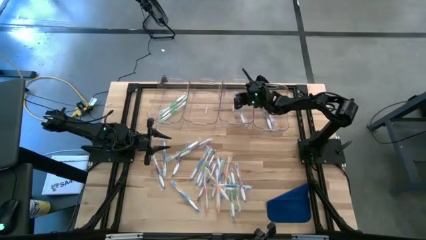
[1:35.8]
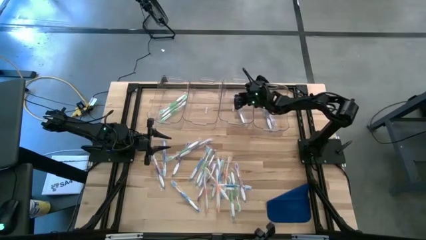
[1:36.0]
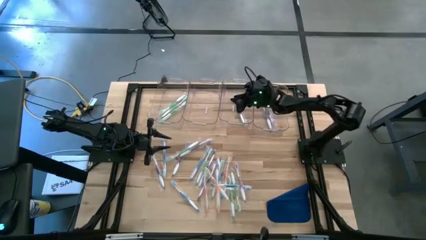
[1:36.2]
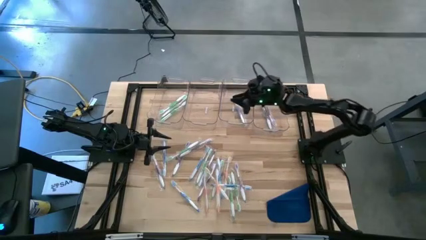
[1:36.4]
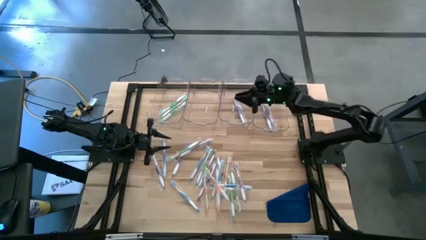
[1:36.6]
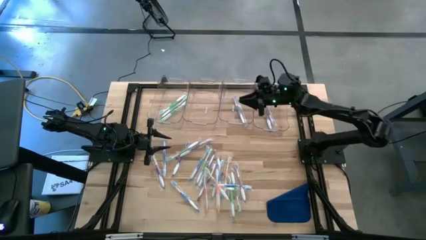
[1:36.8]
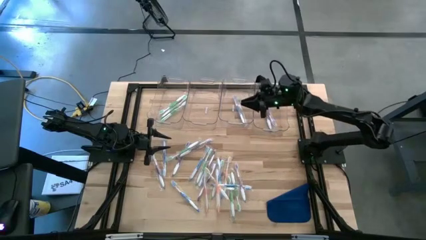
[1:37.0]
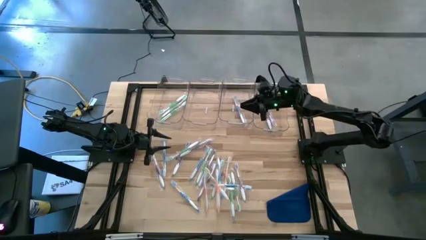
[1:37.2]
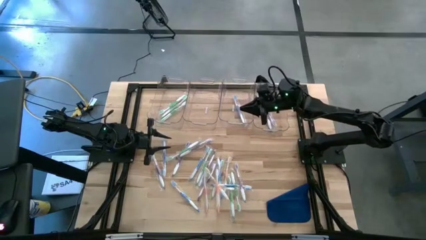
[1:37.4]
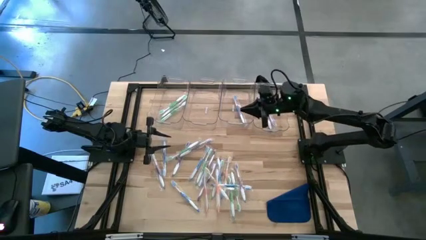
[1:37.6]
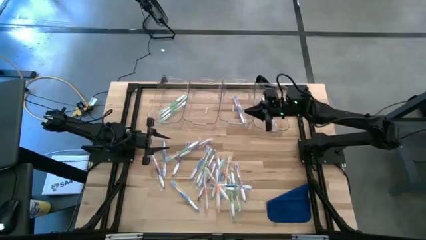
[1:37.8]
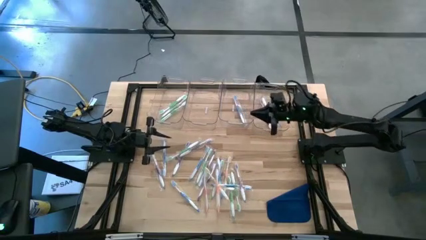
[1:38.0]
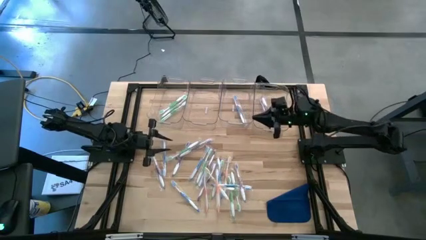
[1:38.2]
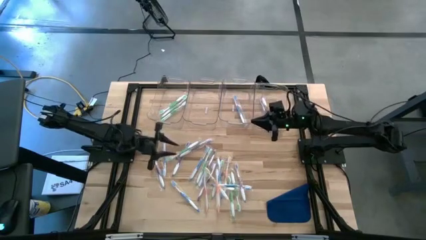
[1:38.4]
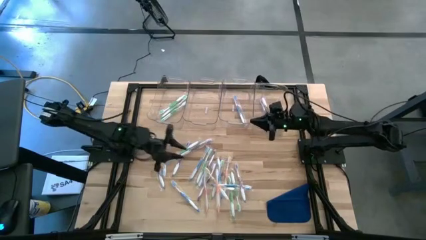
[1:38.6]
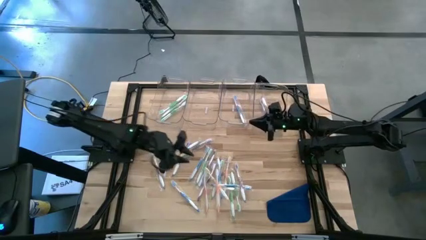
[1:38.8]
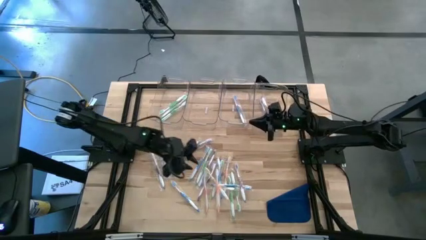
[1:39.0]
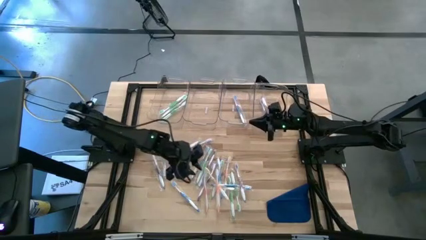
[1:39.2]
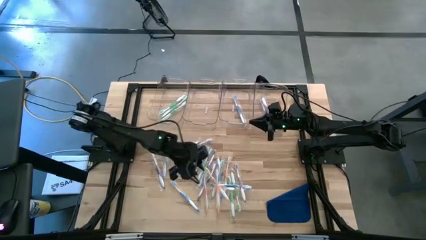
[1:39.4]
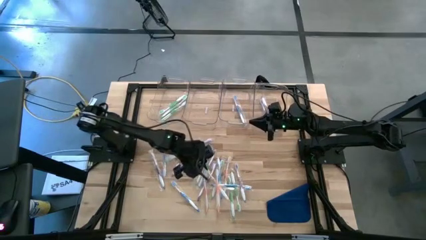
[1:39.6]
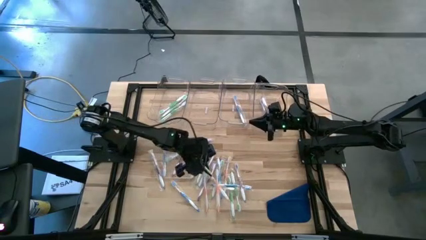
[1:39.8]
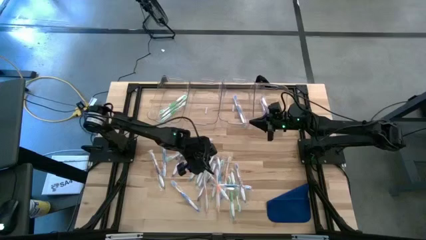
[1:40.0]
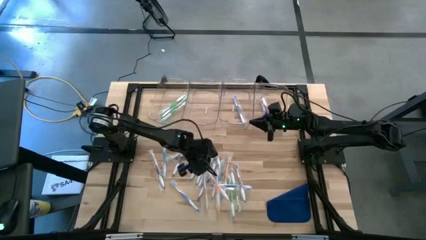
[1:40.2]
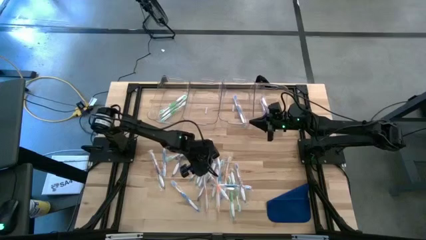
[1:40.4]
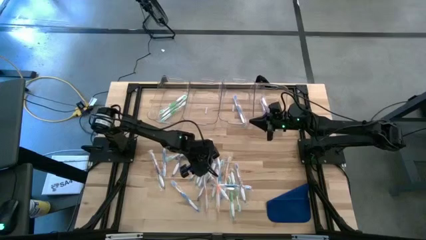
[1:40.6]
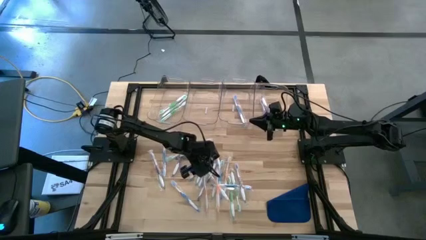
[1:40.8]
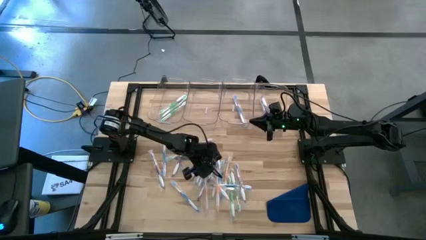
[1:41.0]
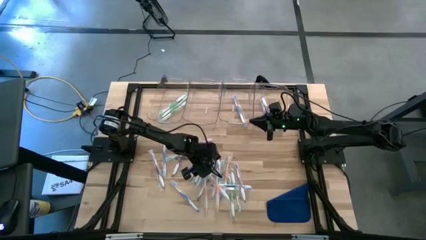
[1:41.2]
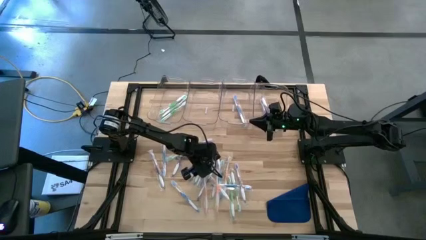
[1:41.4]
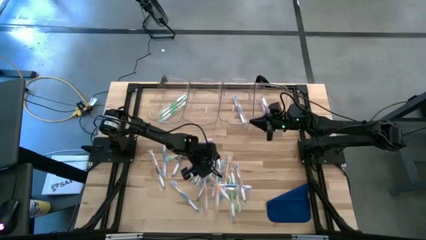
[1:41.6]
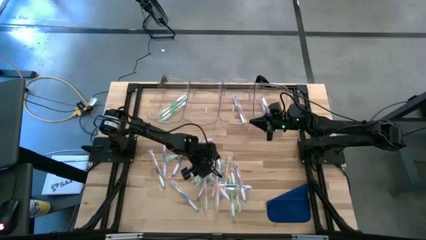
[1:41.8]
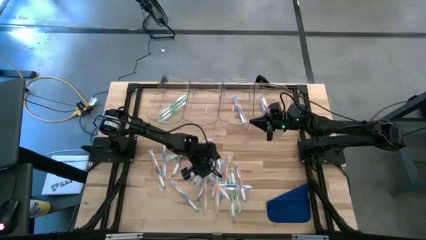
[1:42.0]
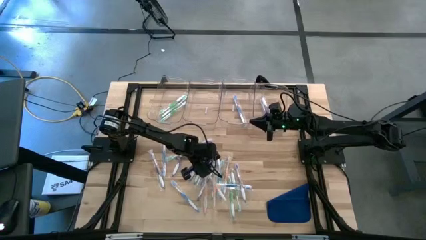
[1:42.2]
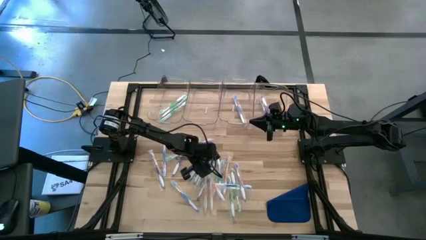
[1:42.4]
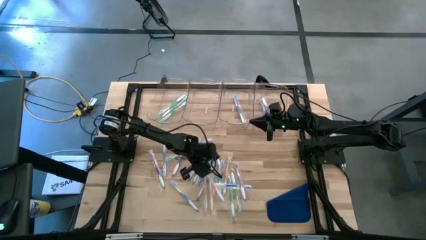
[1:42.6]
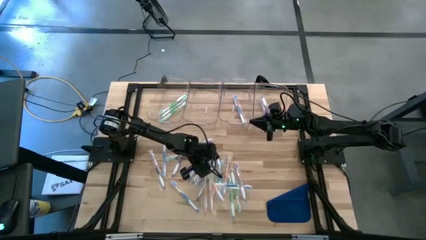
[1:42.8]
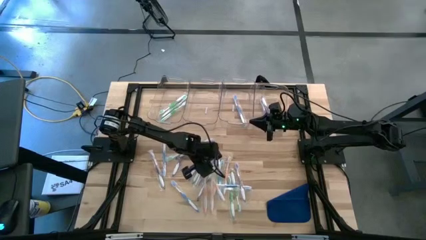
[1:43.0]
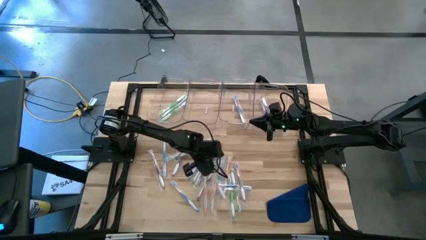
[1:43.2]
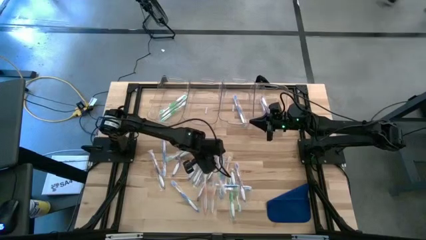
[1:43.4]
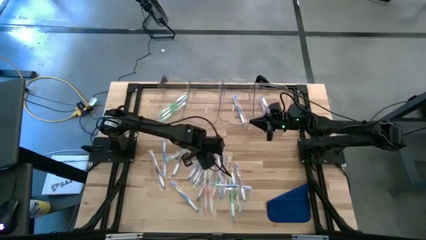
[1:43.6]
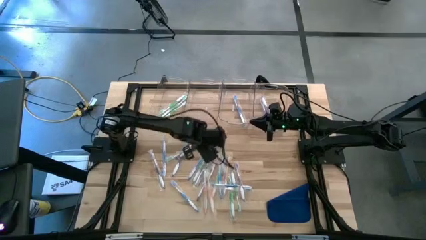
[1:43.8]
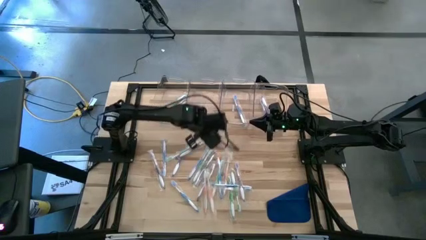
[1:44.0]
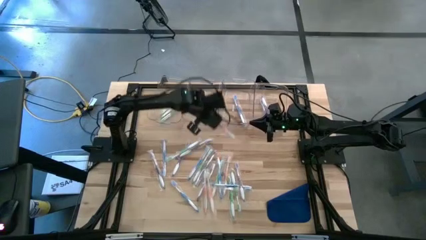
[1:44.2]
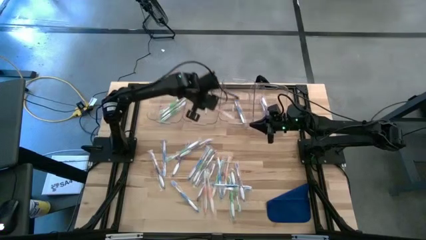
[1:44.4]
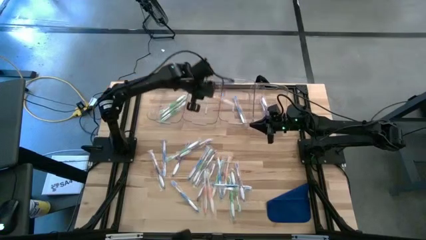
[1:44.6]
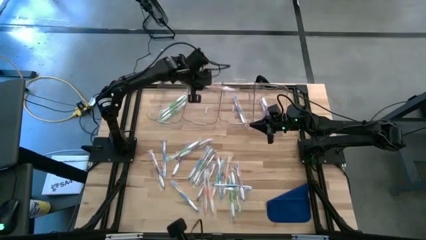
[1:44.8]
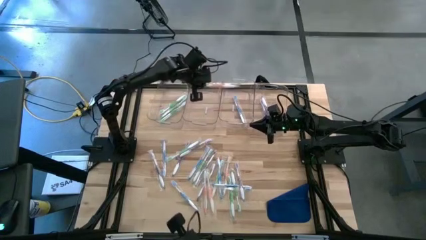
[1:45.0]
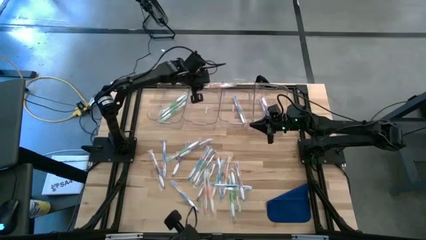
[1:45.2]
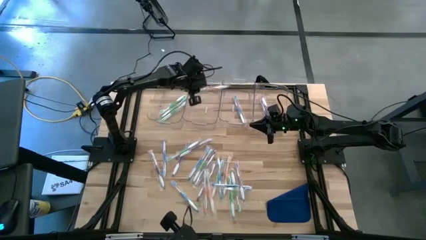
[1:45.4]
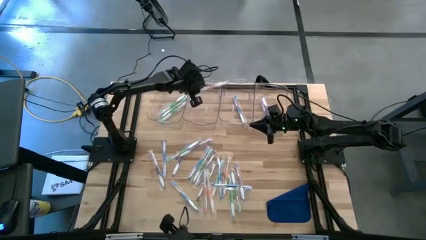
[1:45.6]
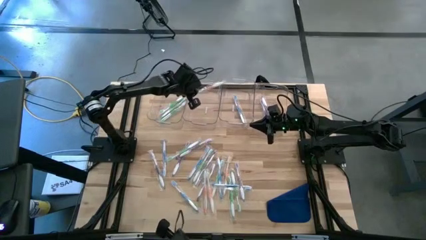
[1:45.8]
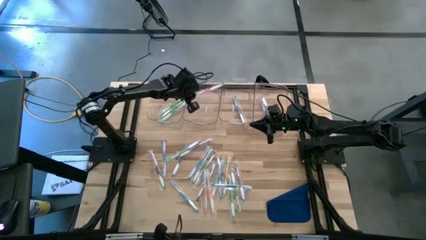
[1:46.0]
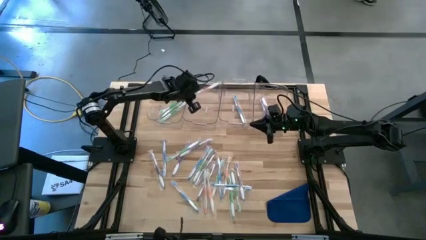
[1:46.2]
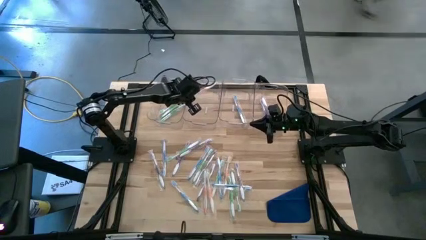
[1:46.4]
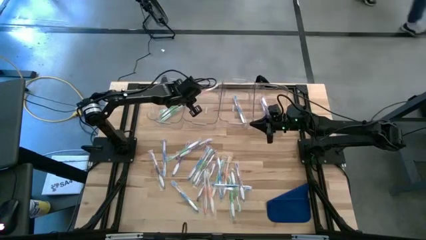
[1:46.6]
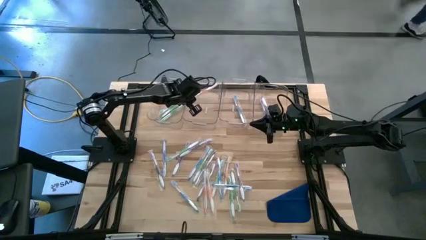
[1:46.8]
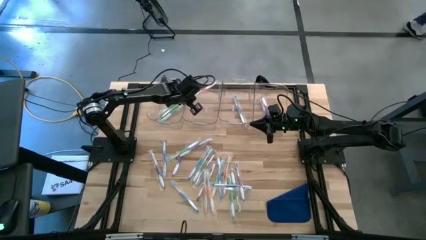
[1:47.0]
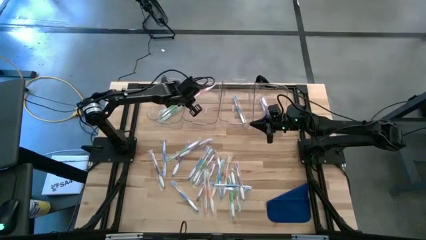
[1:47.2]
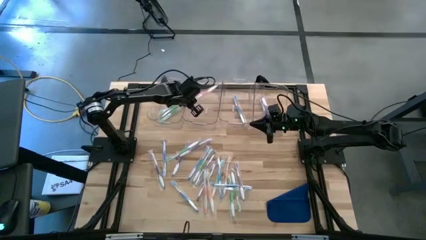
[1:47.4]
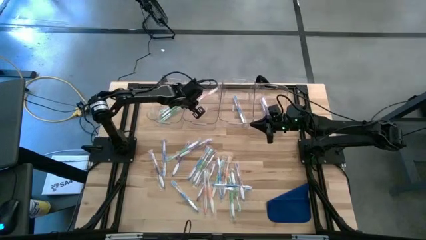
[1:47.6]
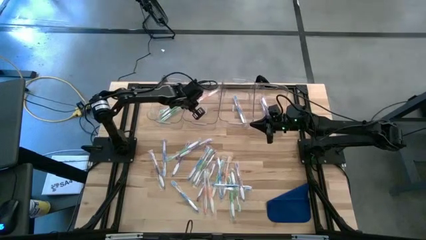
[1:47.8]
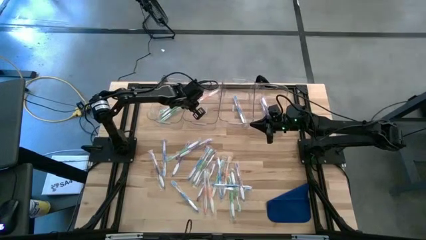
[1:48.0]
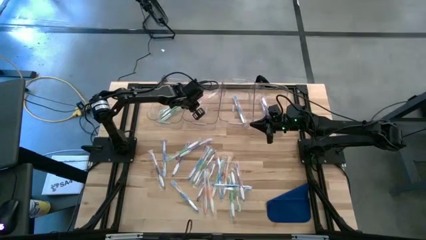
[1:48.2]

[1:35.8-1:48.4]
Task: Pick & Place Toothbrushes
Put the orange toothbrush into the middle left transparent bin

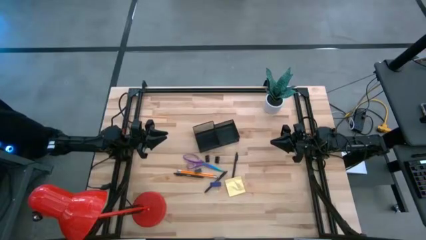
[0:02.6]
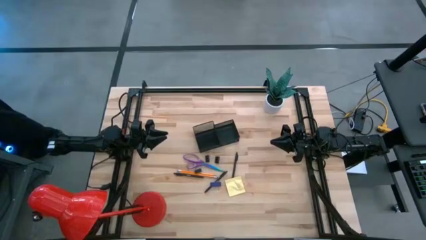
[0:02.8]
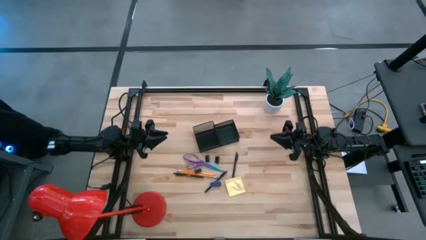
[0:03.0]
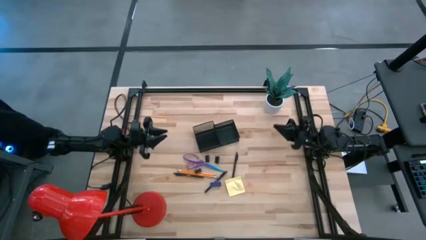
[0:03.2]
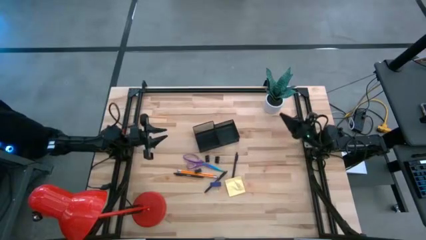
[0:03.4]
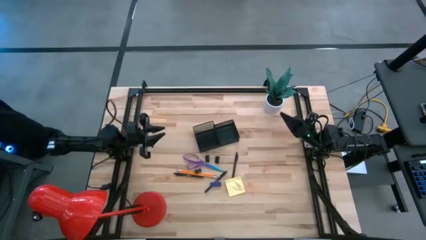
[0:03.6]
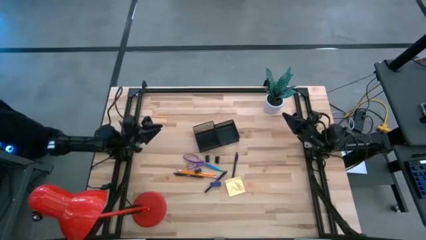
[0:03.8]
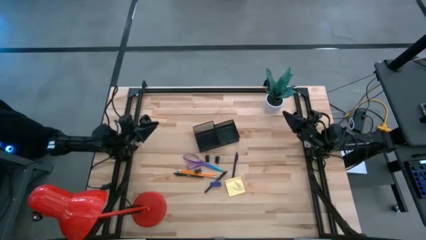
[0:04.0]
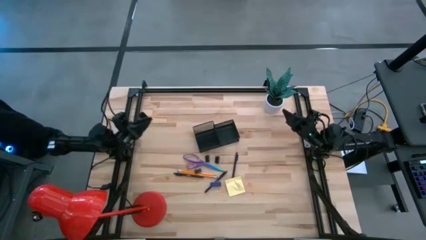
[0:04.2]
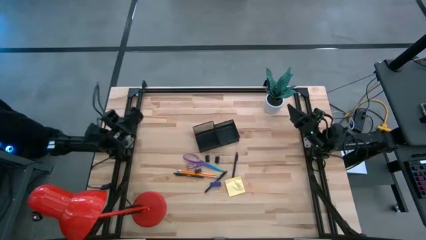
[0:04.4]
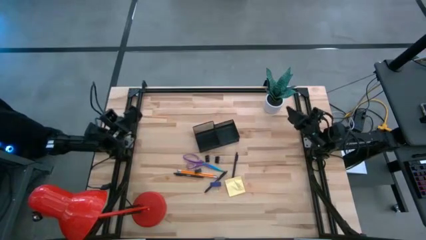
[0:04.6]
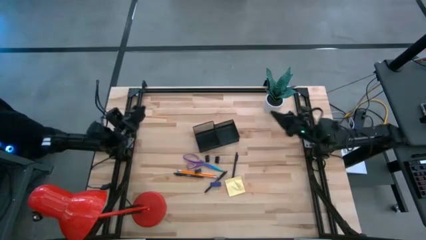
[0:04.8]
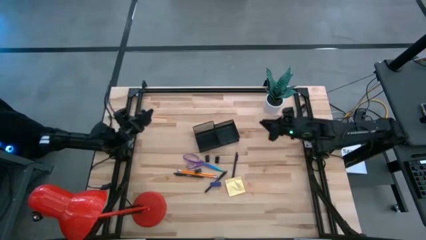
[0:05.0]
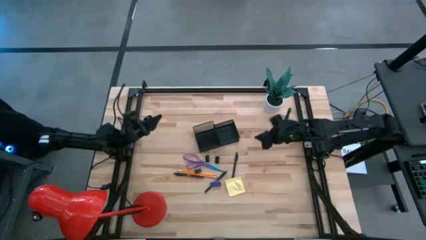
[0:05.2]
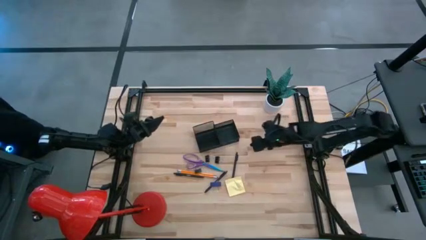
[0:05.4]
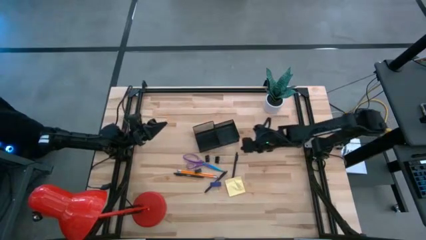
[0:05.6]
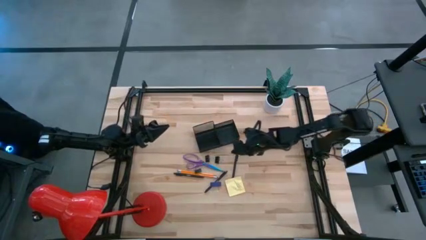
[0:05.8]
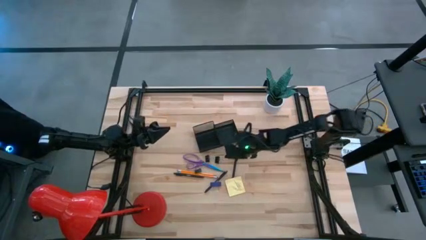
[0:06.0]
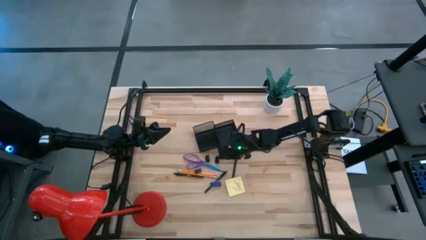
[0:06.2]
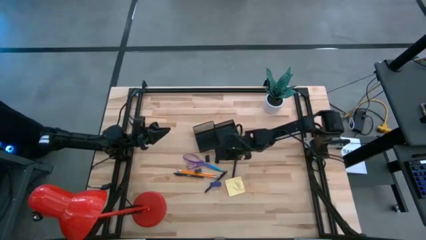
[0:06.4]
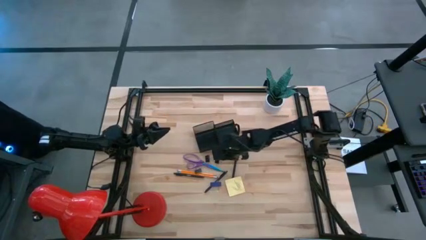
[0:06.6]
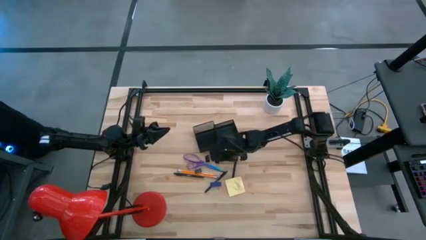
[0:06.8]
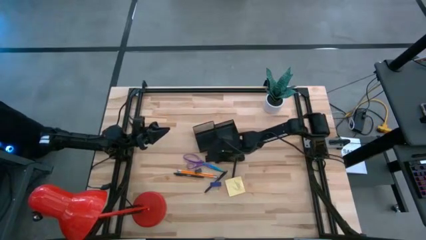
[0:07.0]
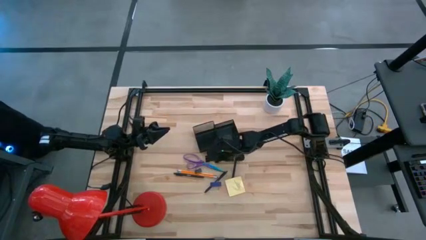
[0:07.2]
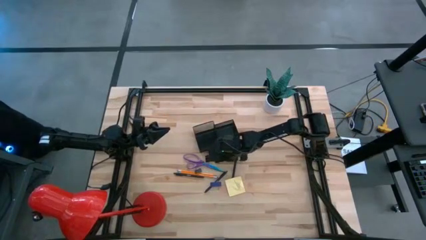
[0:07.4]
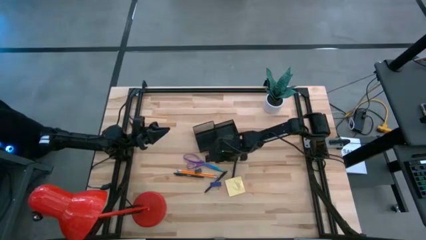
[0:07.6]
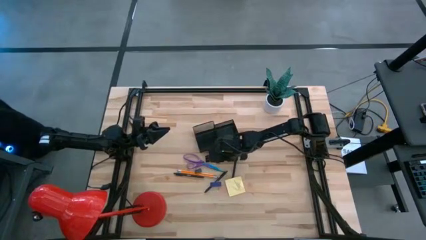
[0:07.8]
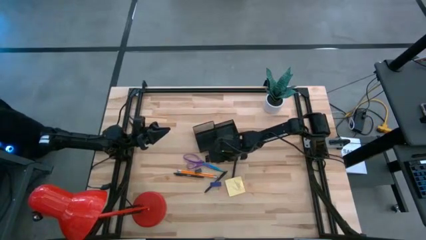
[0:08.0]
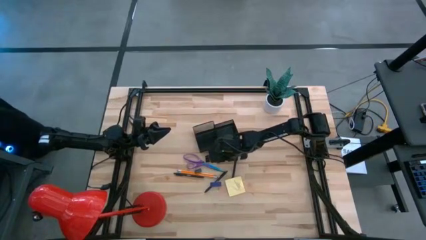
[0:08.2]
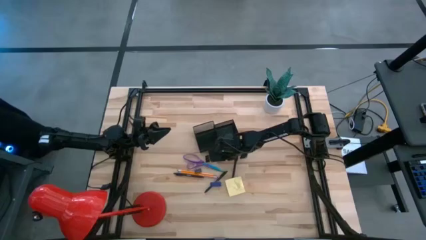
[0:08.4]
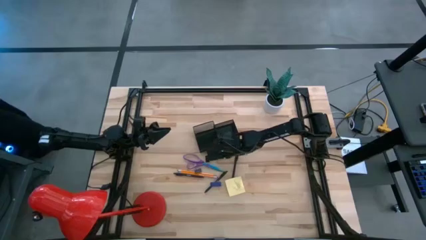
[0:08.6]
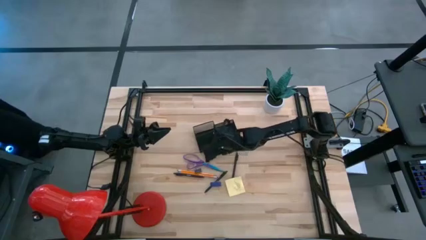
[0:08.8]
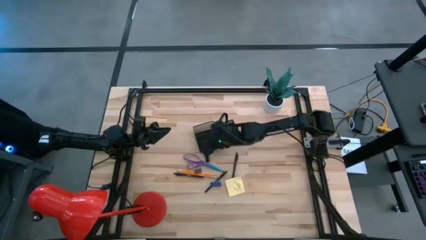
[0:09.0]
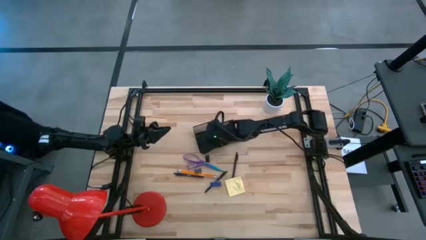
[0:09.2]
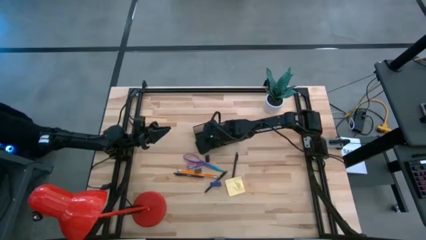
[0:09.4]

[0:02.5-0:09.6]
Task: Pick and place office supplies into organizer
Put the top right black binder clip into the black desk organizer
